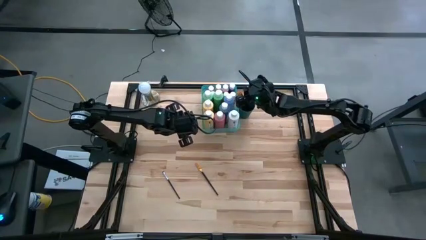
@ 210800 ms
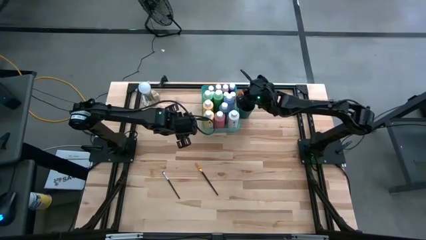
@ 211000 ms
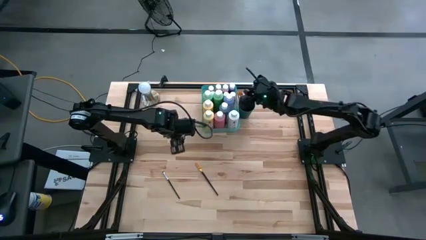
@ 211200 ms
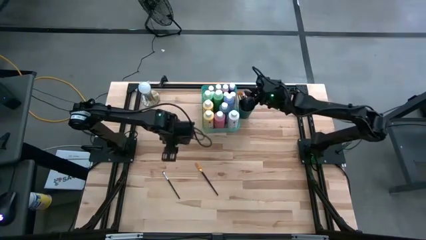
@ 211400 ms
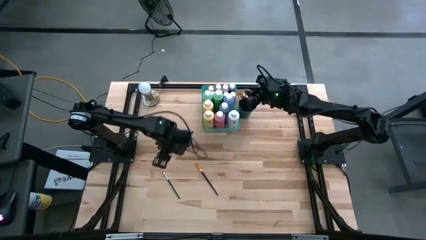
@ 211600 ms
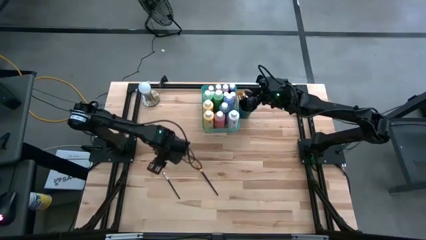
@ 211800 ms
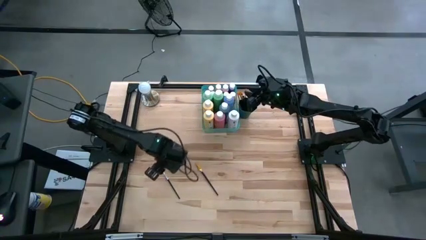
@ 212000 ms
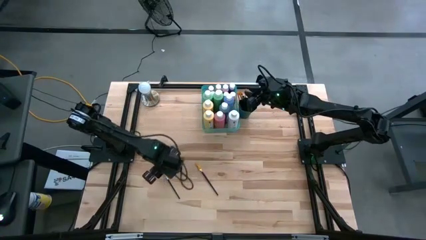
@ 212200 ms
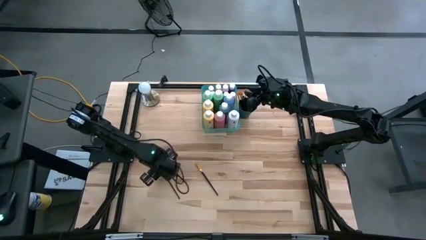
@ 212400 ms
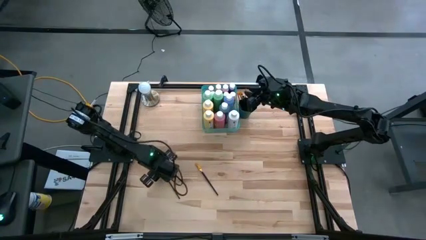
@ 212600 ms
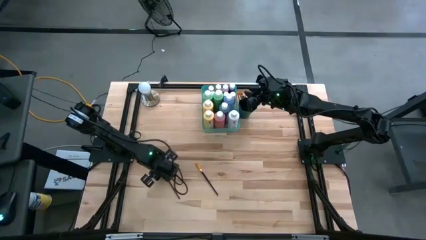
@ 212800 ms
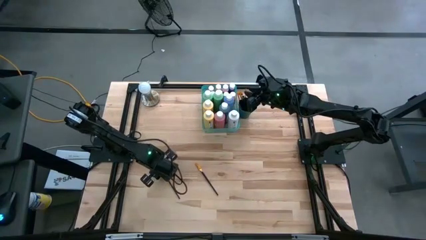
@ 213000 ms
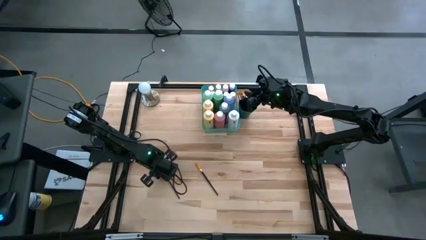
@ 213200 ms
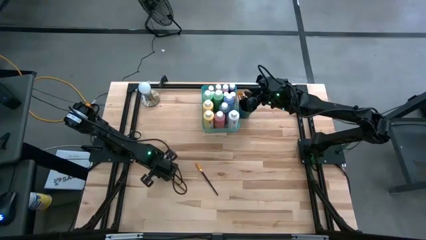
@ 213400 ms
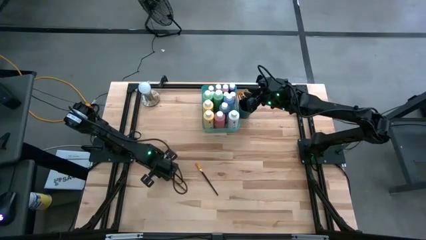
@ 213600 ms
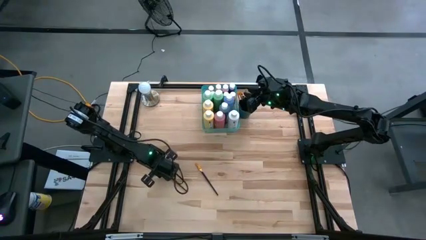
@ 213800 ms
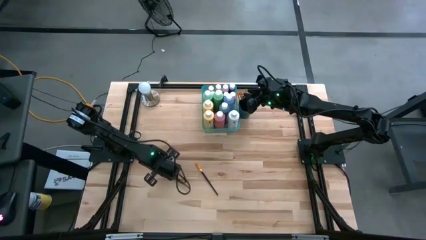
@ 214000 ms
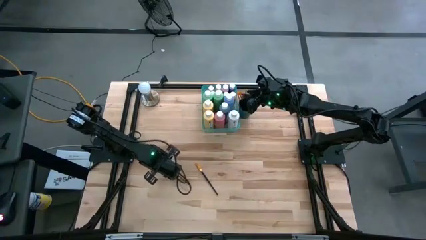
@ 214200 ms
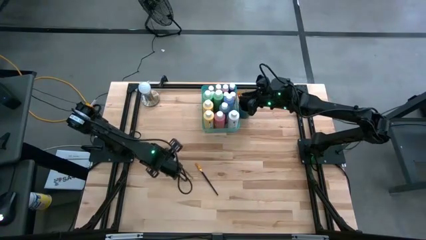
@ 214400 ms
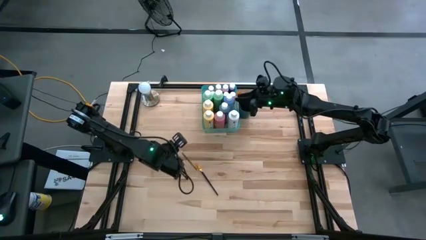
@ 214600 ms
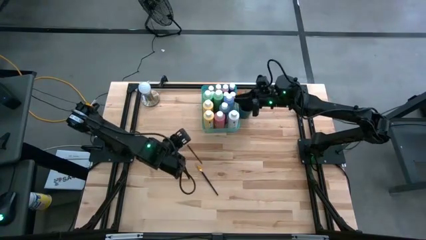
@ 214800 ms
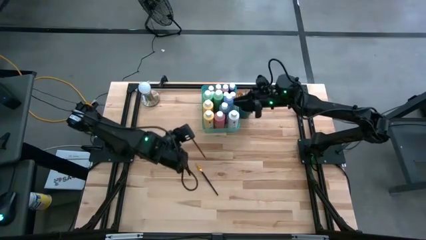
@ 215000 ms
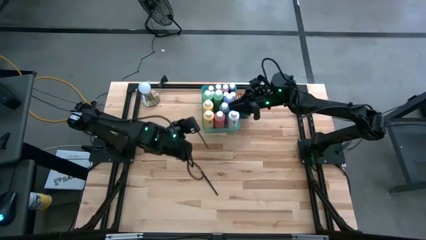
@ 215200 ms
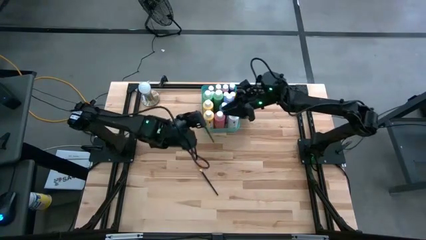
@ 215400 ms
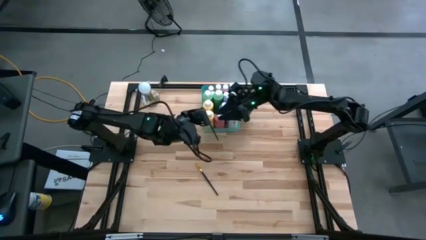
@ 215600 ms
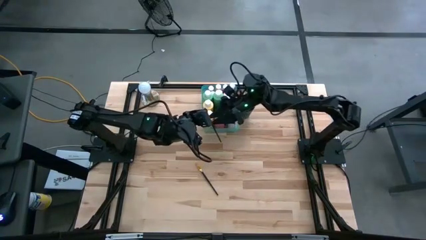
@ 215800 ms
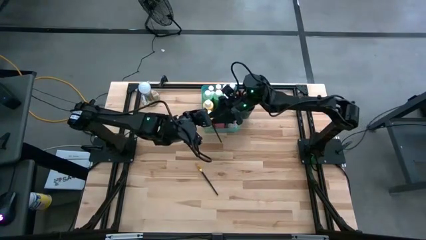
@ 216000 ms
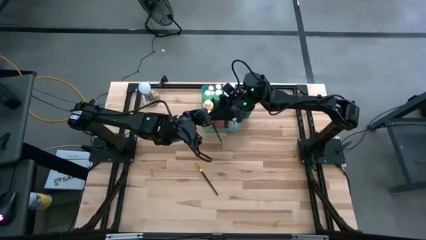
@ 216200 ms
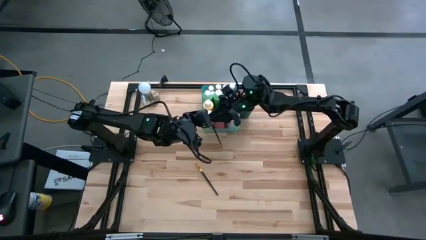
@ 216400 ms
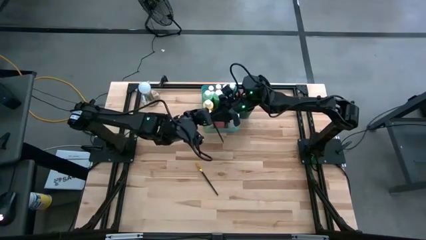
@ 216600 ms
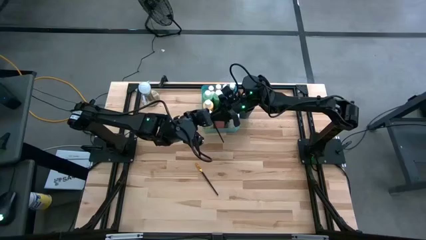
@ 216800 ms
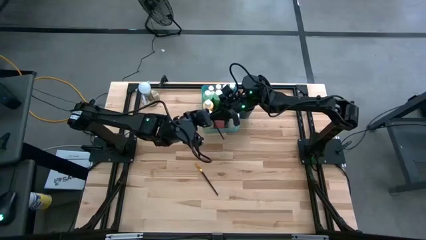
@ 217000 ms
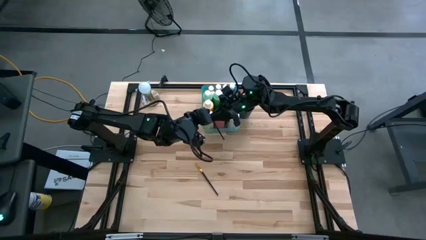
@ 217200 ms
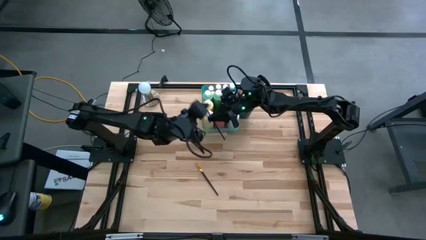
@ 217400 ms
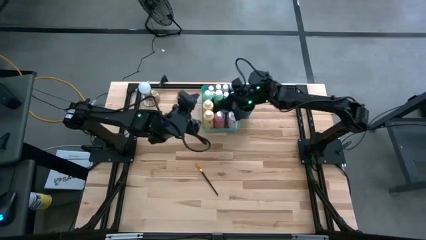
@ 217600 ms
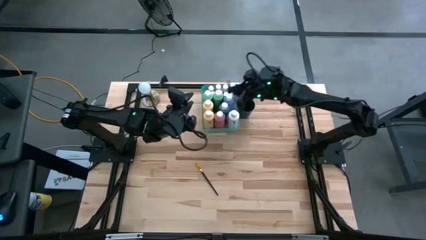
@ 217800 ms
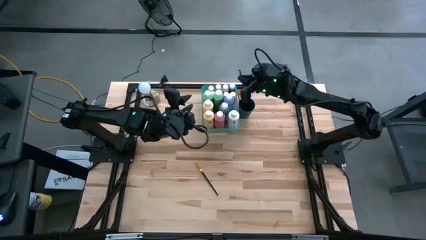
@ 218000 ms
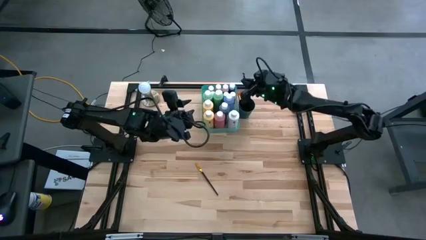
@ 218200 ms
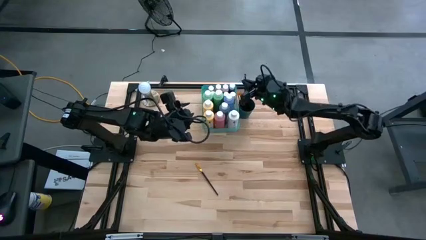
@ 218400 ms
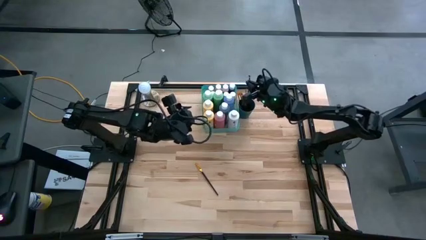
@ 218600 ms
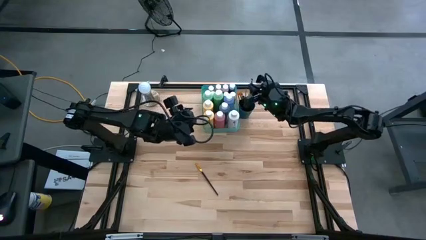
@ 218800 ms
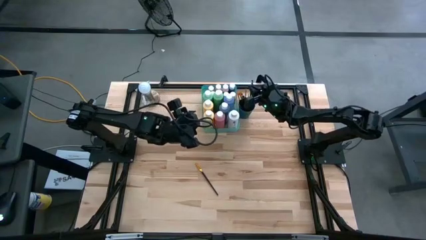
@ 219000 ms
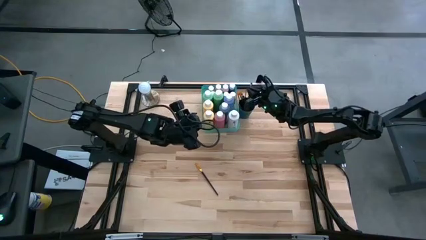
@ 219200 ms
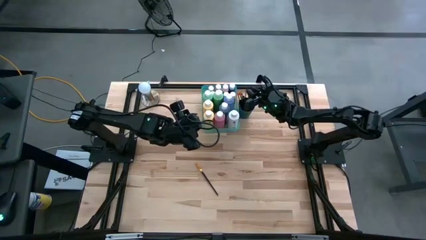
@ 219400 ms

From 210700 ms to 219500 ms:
Task: Pick & Place Paint Supplies
Put the silver paint brush into the green cup

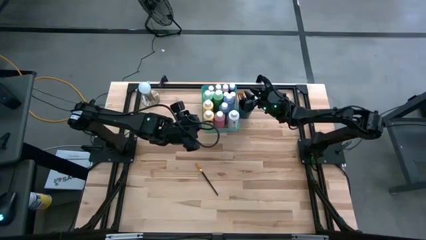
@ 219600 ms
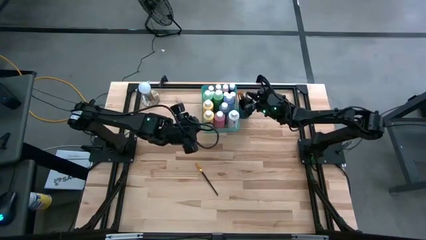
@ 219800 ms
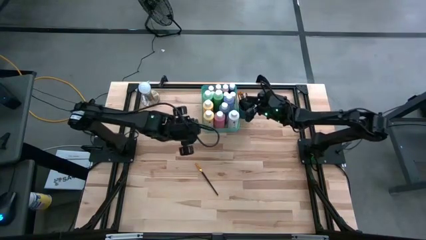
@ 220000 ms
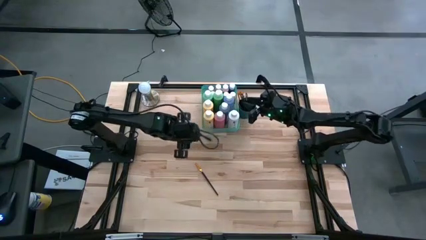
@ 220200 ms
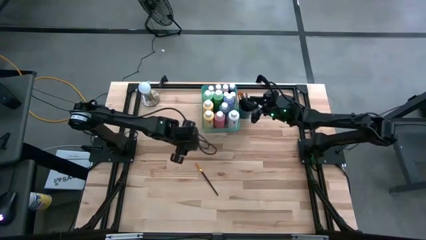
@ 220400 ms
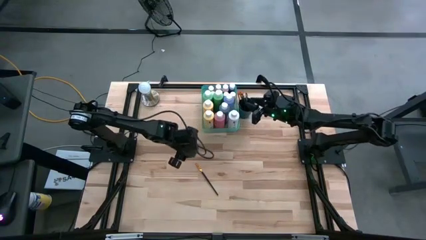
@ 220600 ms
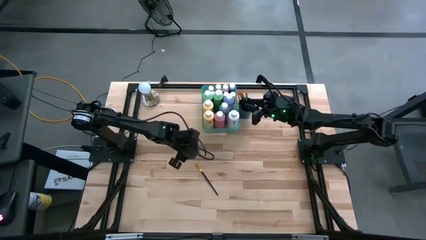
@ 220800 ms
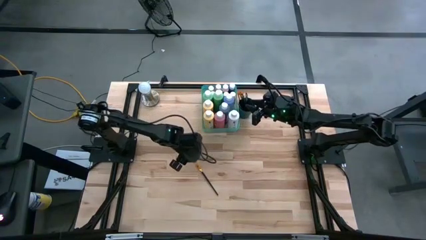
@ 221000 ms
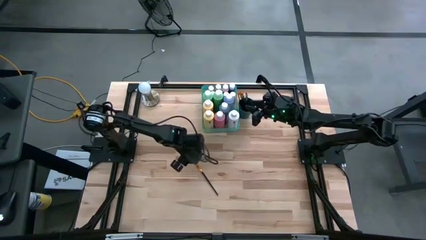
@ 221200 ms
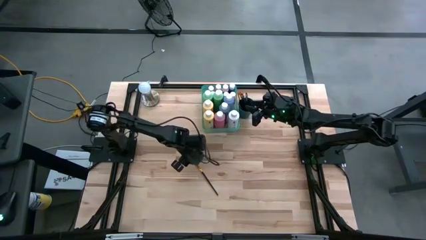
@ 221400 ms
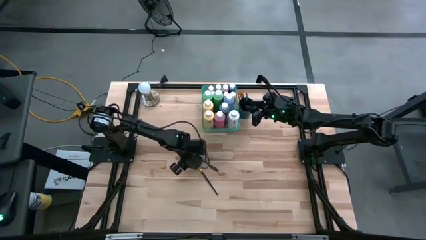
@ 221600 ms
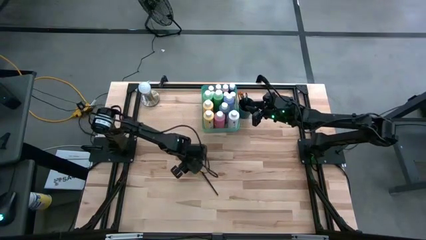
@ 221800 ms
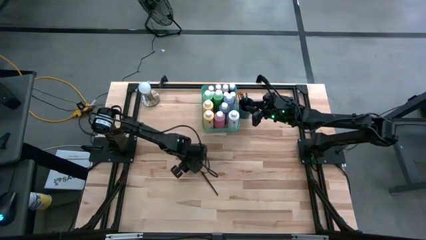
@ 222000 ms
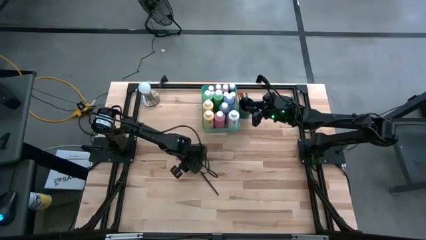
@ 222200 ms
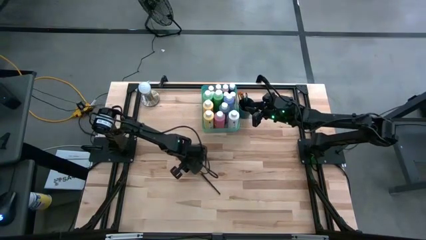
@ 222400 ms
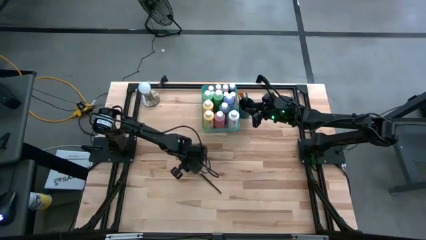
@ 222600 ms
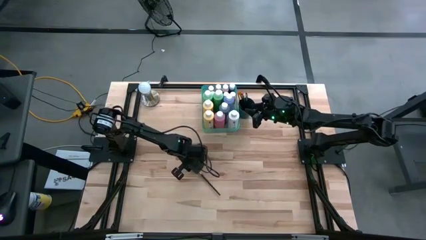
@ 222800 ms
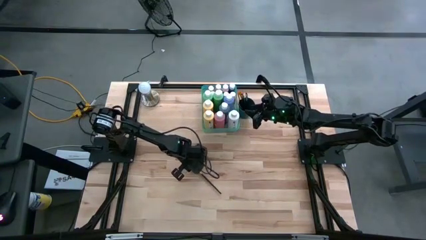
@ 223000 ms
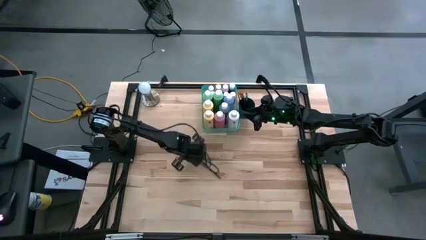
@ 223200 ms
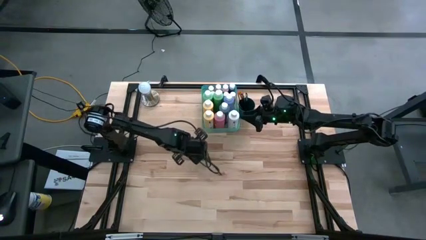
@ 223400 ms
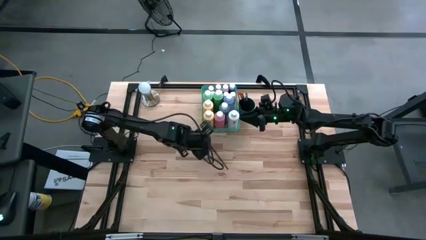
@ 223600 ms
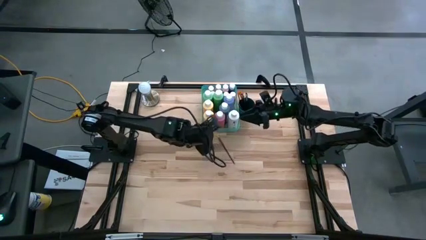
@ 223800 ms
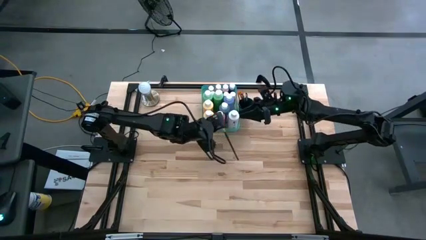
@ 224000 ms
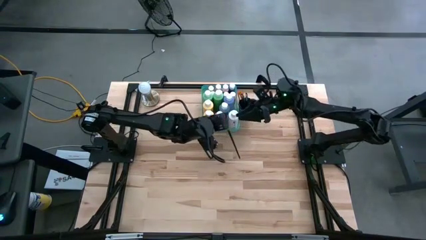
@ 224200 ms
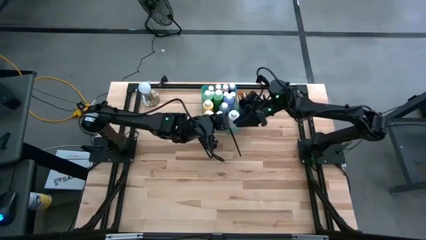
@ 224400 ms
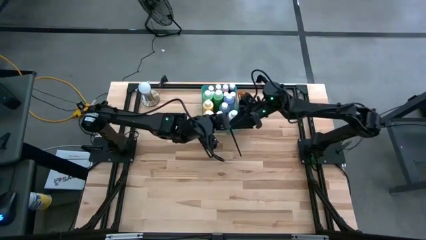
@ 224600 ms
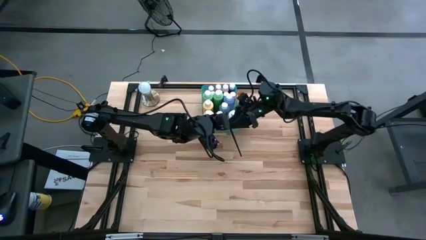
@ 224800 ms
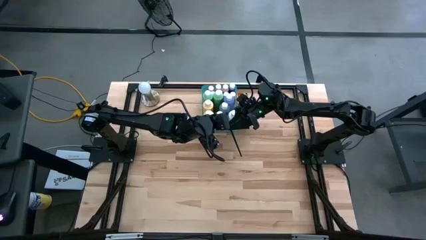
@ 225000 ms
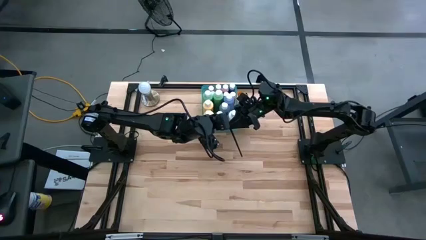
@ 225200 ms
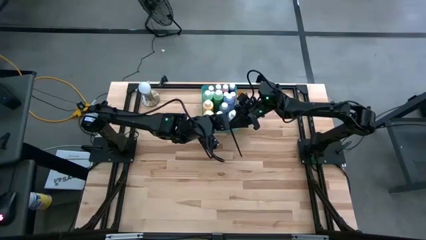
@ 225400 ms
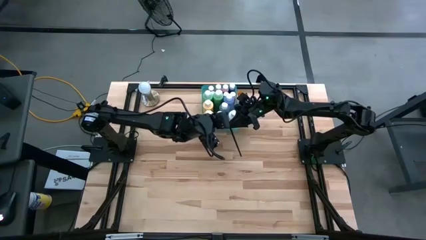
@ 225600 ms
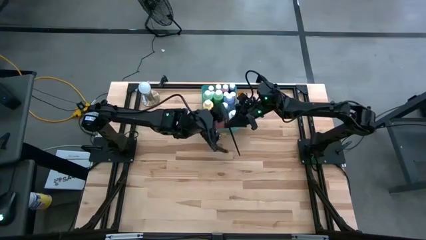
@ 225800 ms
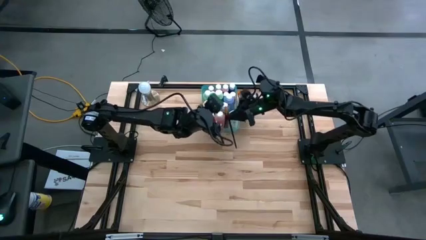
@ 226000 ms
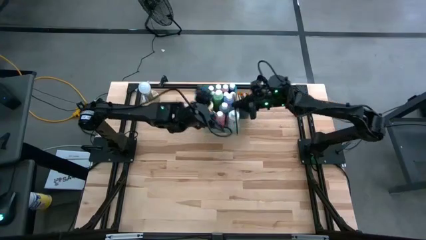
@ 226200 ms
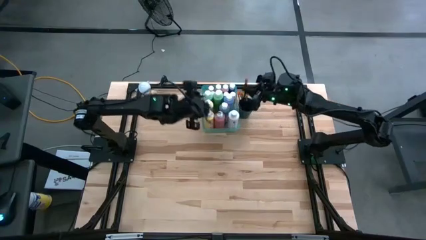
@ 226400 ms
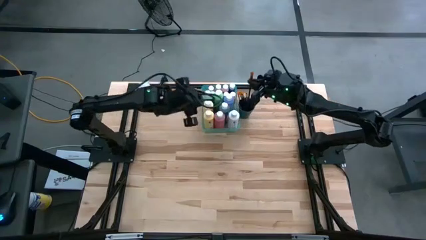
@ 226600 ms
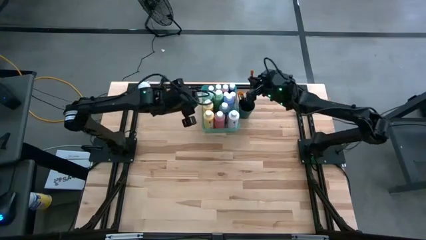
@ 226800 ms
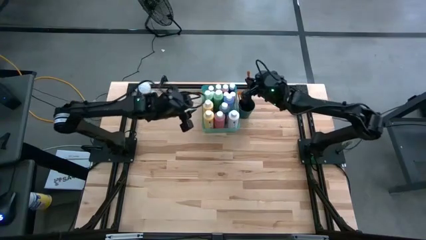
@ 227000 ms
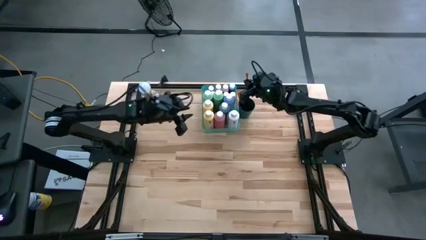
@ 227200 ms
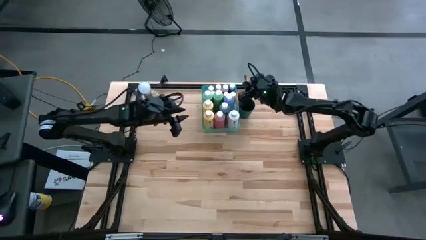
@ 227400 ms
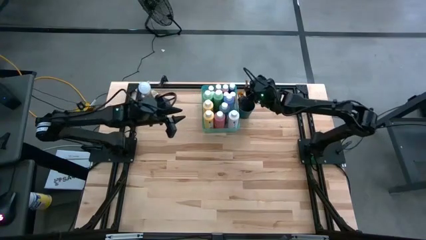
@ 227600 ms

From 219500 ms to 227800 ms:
Put the gold paint brush into the green cup
